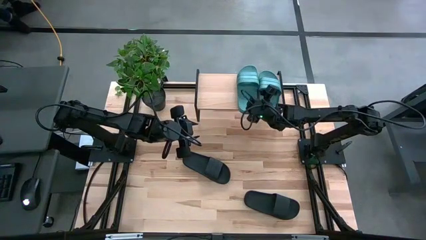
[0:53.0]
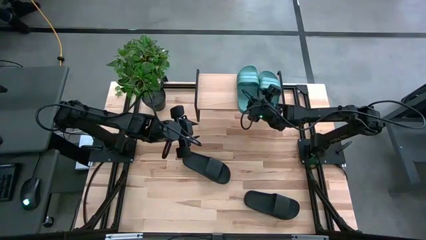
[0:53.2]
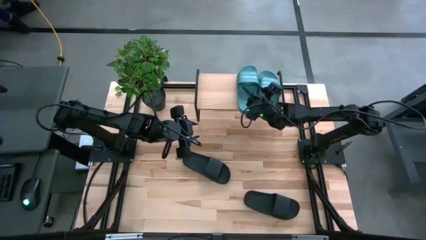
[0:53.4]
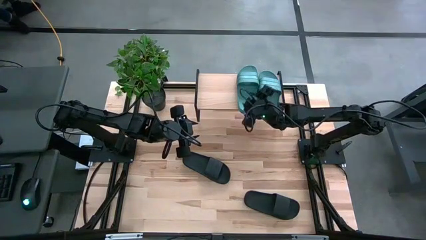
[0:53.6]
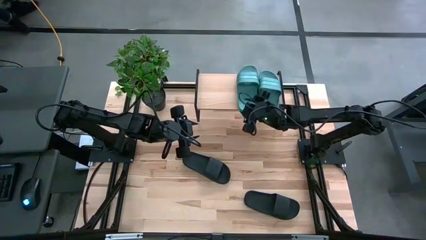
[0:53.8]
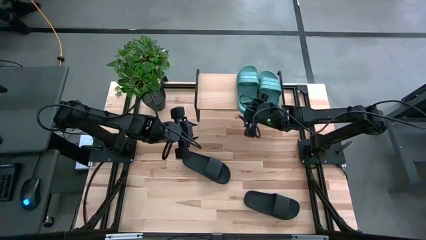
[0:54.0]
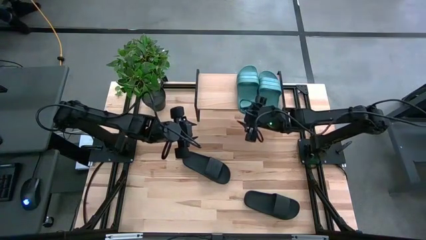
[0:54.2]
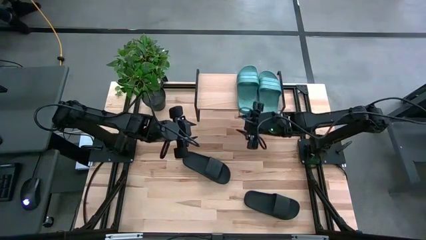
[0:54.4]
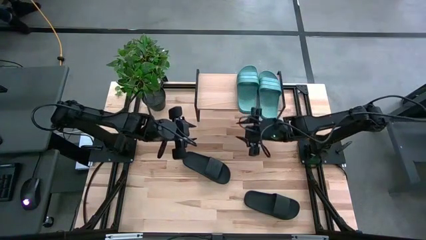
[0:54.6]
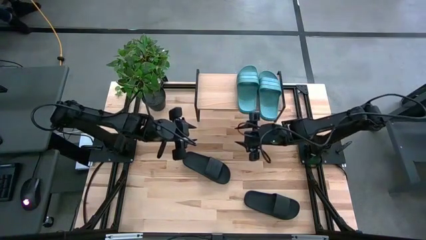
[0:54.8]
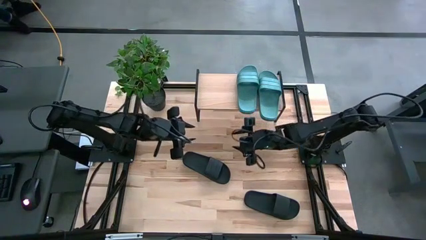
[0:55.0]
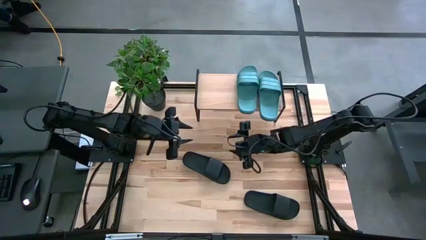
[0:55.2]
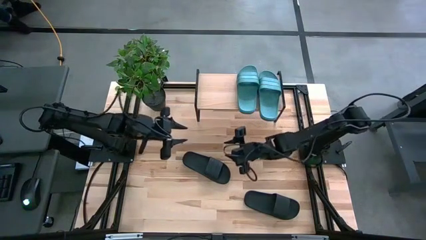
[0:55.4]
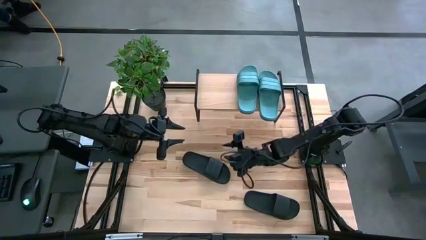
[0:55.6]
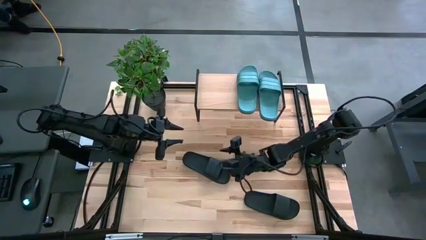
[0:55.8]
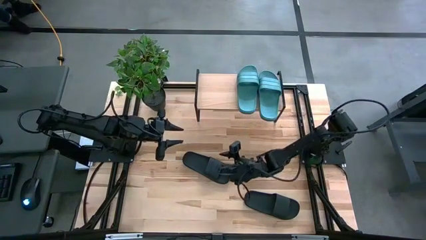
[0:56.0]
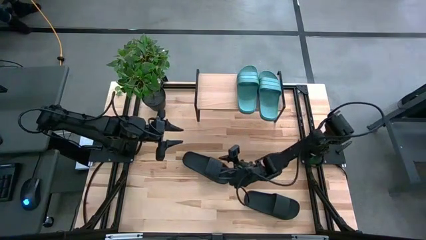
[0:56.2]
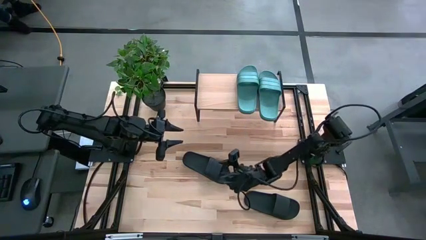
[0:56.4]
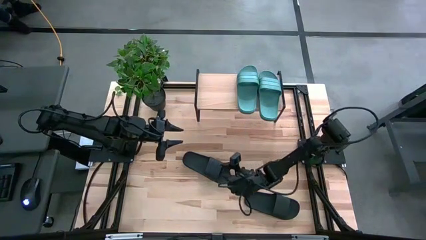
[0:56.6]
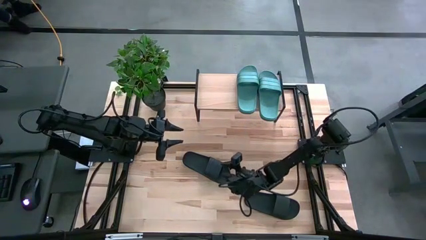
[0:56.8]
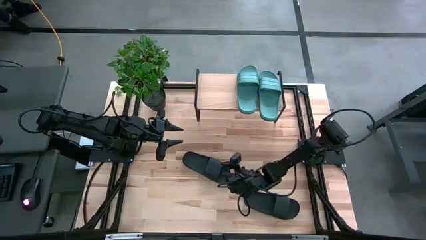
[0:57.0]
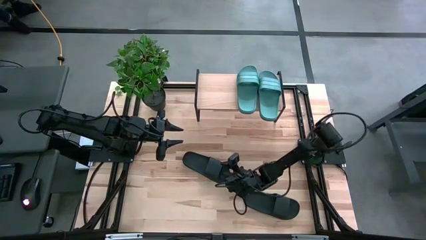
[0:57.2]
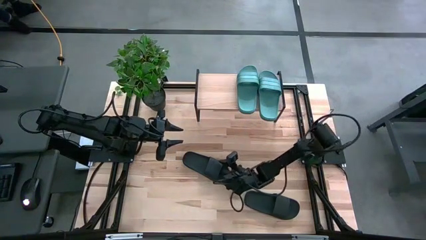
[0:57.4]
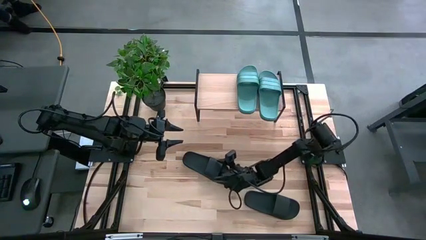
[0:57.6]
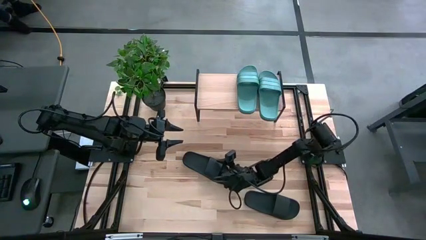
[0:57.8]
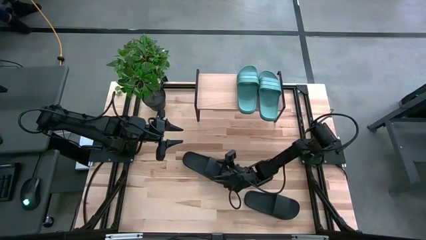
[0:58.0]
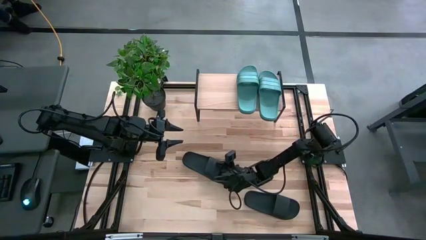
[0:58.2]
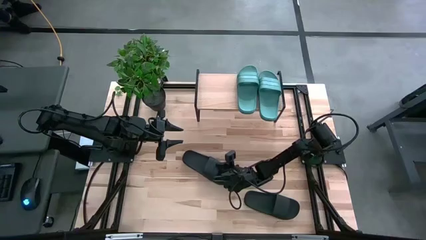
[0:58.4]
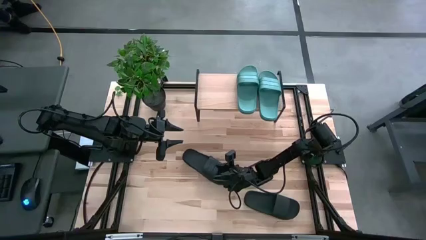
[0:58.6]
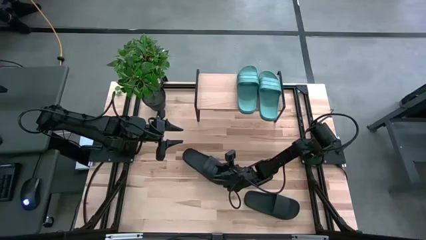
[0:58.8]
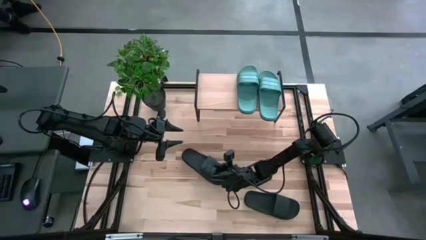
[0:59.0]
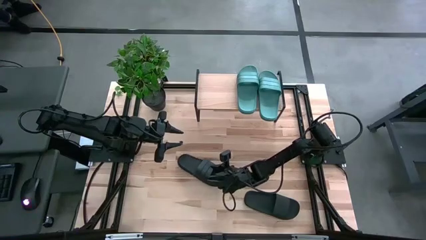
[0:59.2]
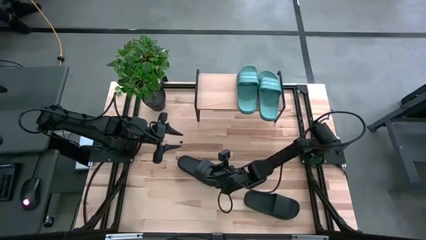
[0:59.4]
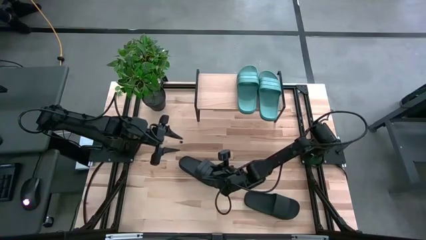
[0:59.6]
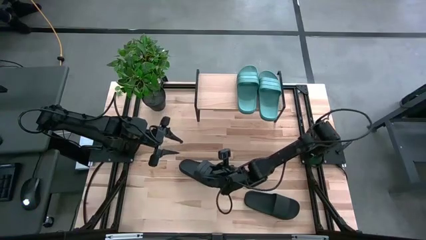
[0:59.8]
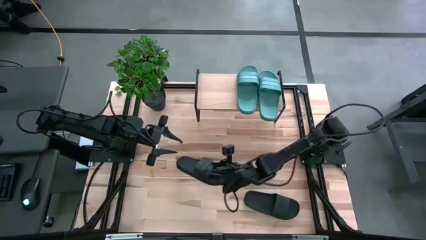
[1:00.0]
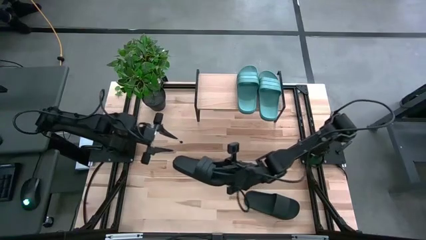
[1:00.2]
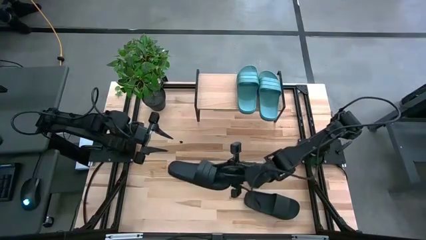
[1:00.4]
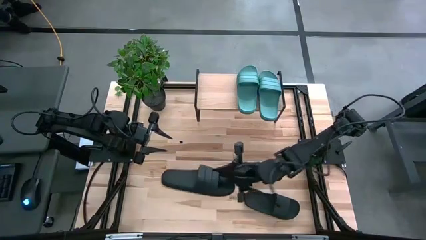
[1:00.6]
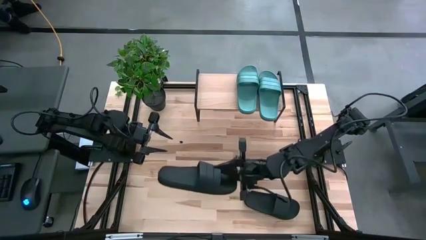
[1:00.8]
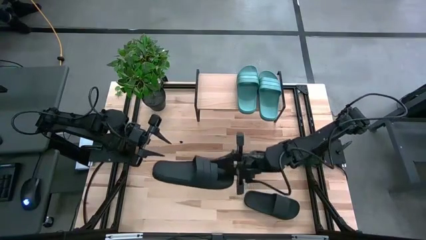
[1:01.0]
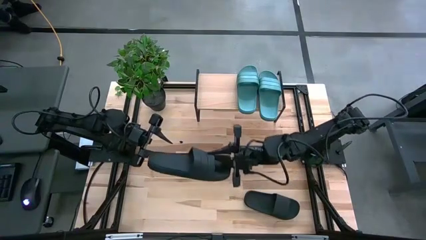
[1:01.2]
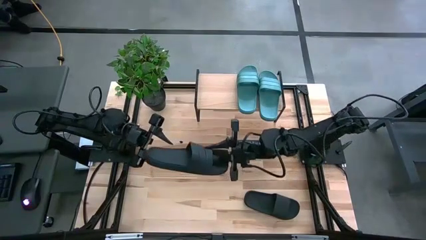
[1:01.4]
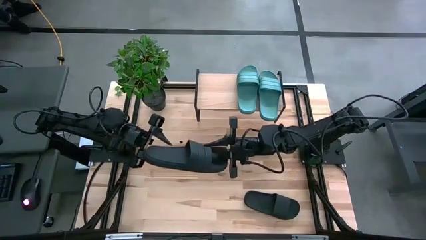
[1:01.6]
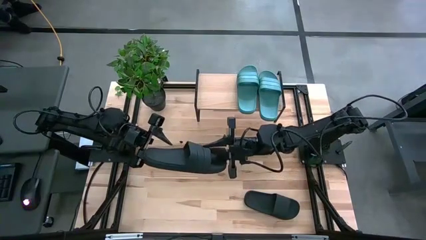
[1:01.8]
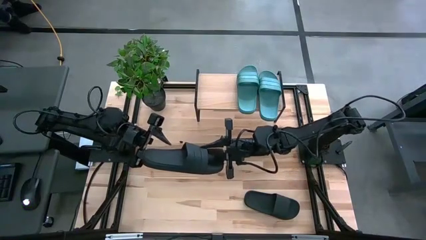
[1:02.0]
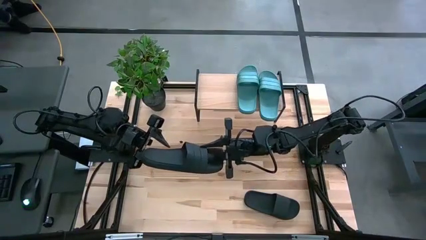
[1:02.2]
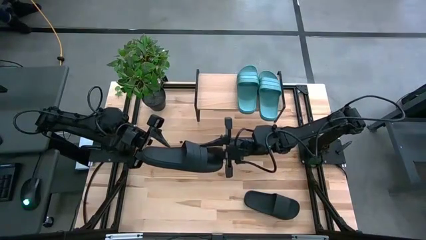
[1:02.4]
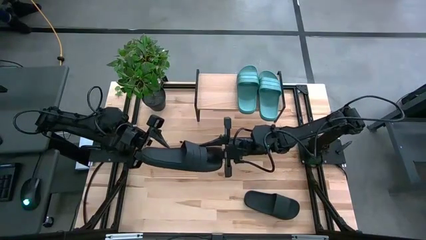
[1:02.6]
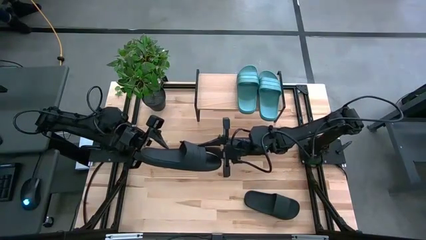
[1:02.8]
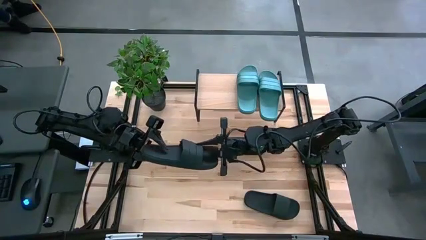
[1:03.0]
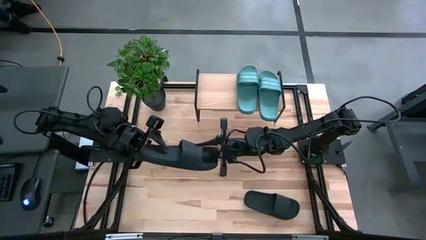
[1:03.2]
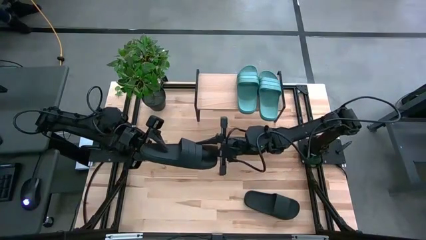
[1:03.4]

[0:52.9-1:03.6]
Task: Pick and place slides into the shelf
Put the top black slide on the shelf
